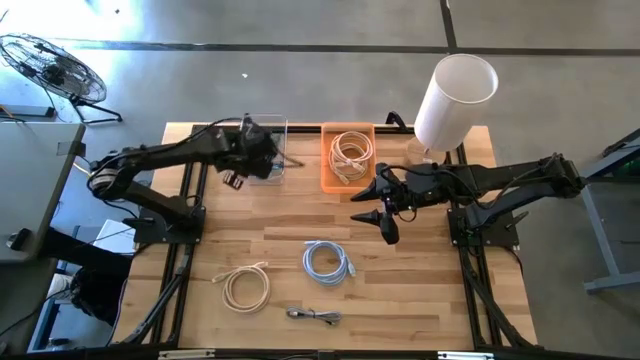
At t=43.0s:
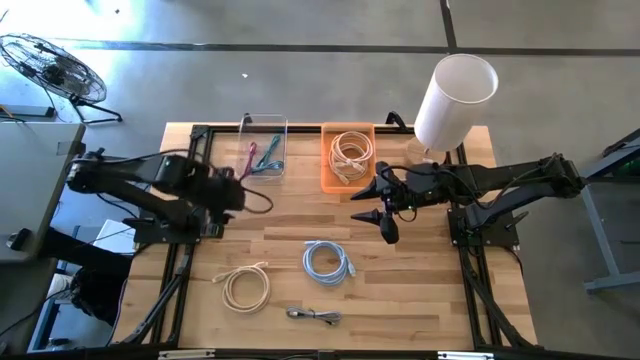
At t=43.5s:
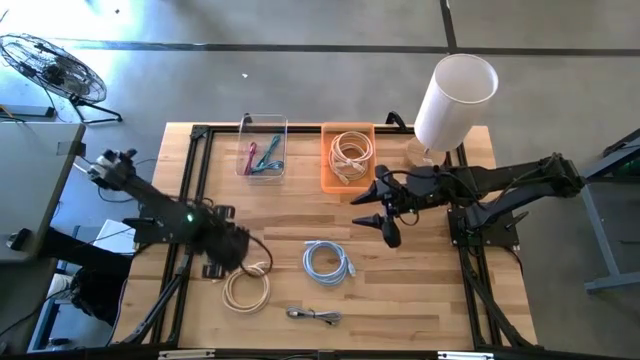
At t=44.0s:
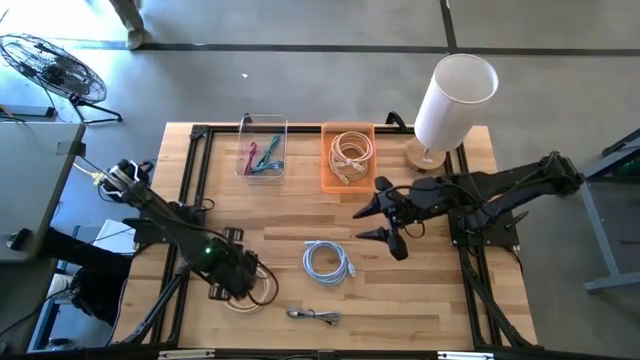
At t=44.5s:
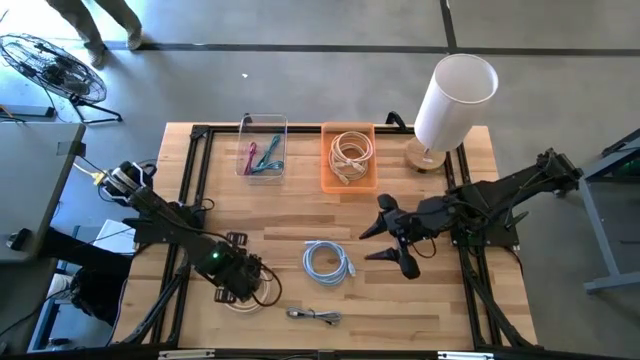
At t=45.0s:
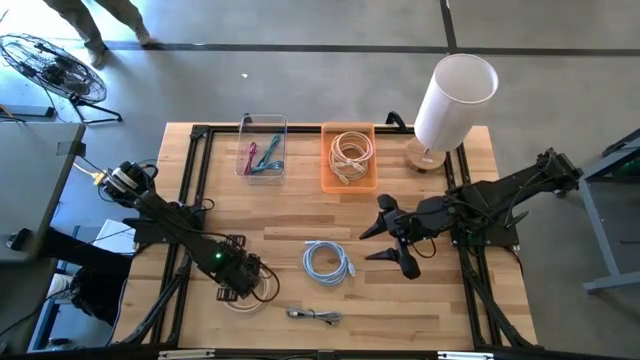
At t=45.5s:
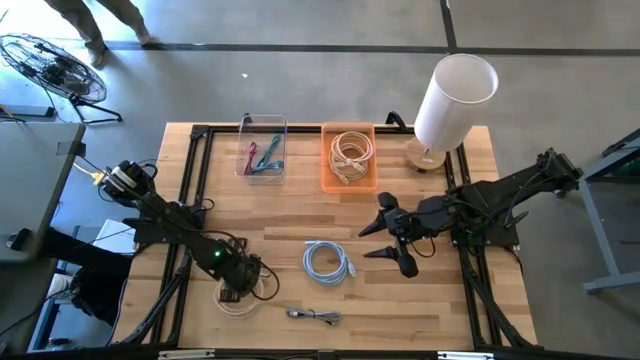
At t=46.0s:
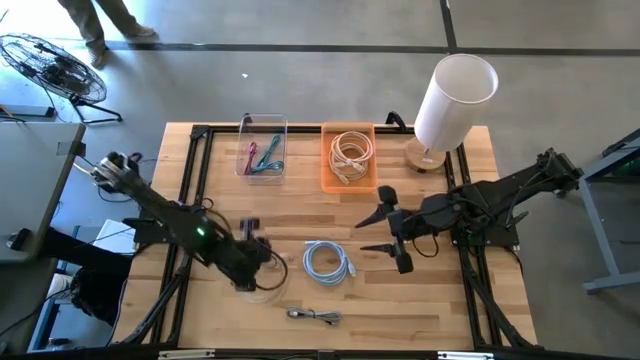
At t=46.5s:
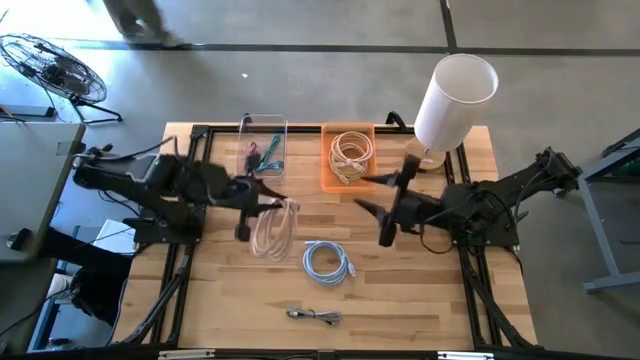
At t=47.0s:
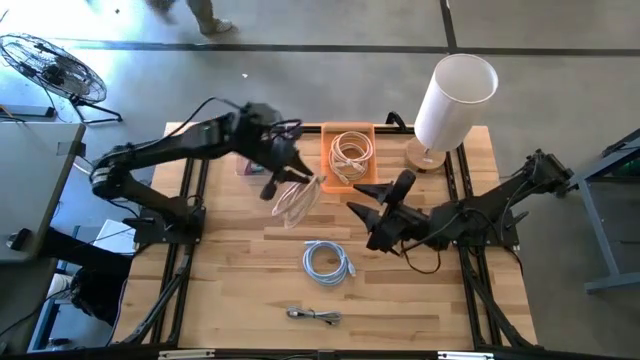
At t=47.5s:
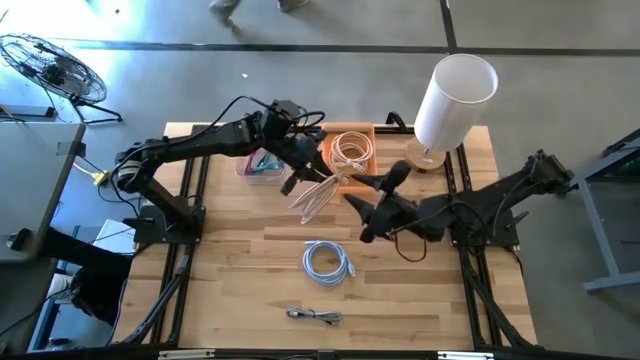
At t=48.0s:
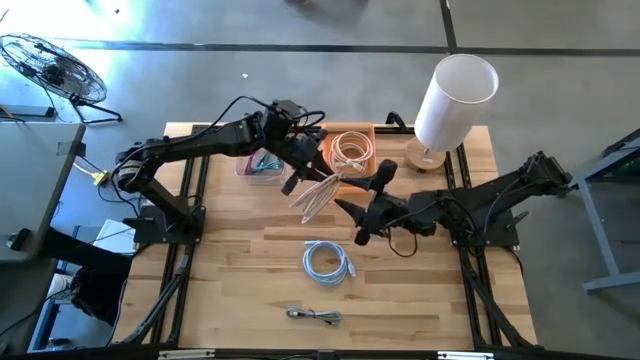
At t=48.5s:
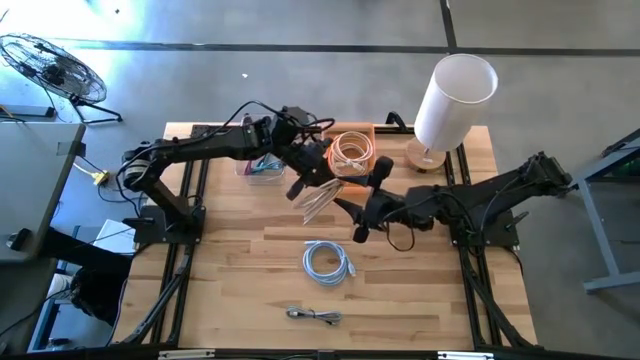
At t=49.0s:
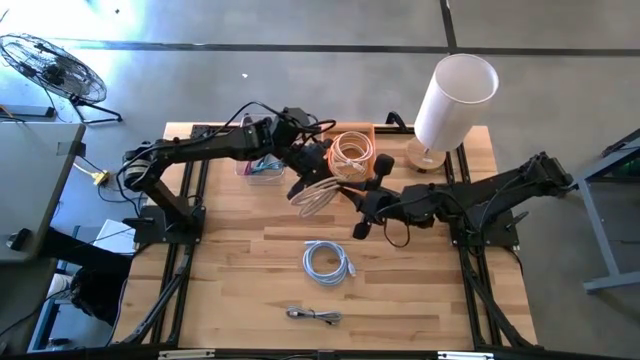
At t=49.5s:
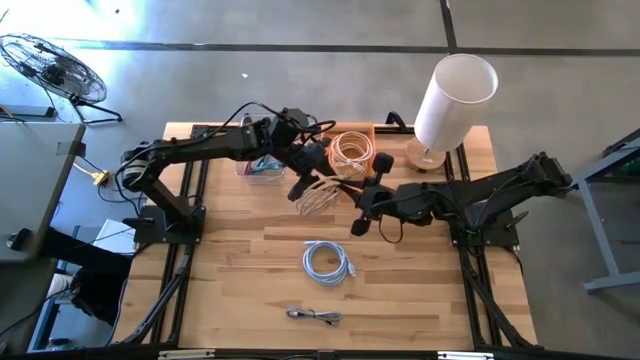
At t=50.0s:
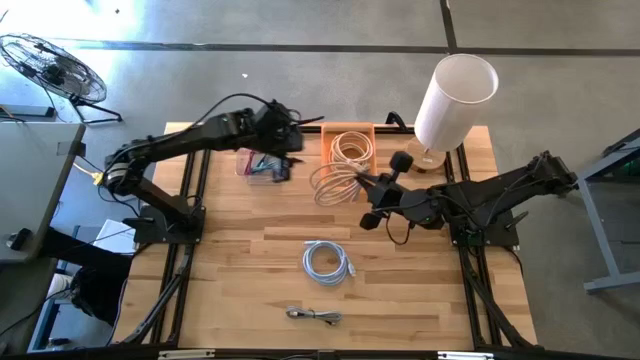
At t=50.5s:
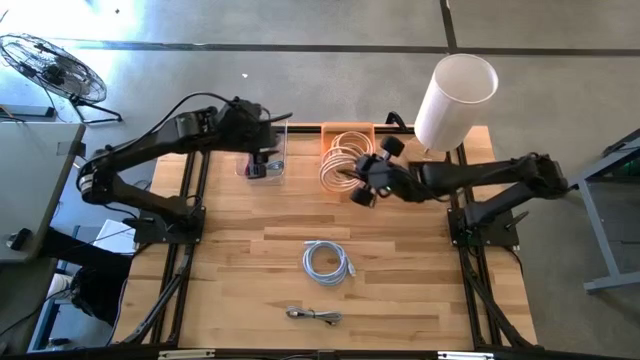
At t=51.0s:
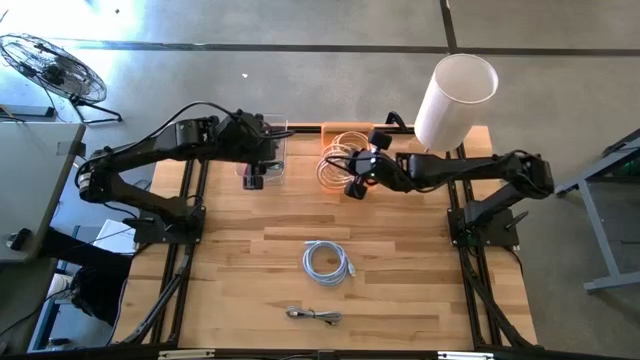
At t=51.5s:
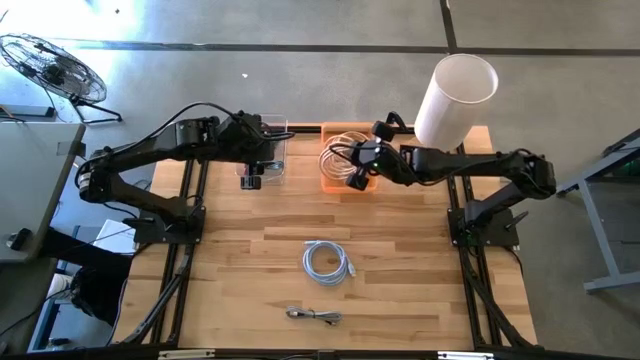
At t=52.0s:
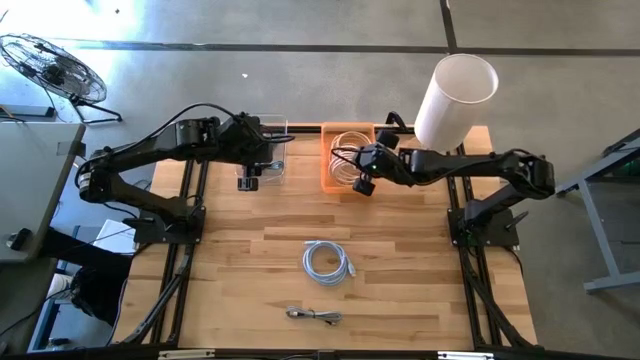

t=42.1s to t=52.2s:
Task: Pick & Place USB Port
Put the white HDMI cable into the orange bin

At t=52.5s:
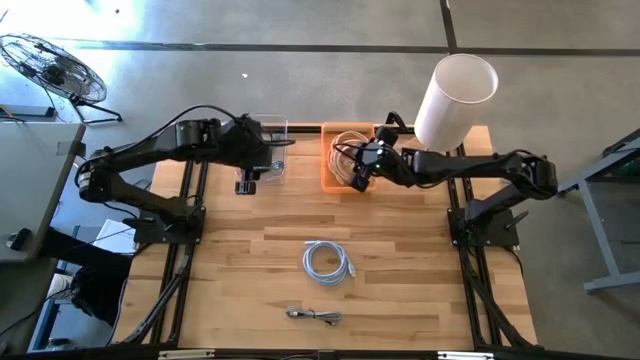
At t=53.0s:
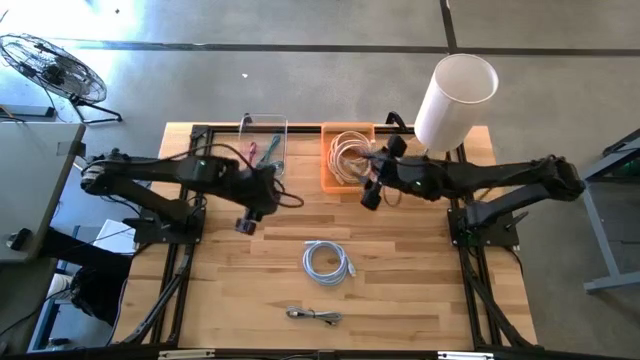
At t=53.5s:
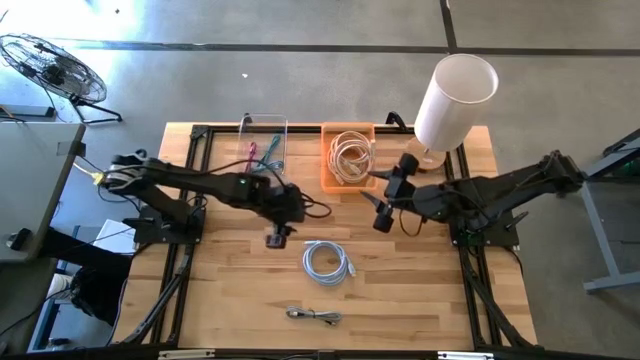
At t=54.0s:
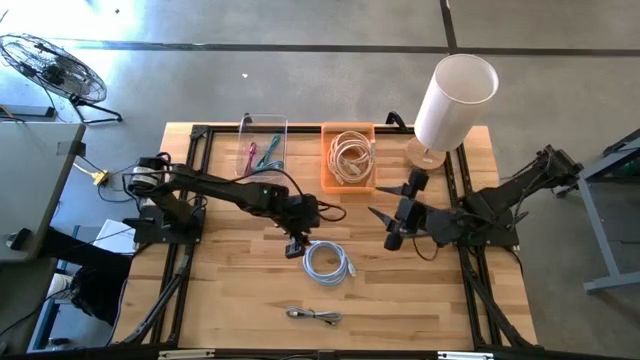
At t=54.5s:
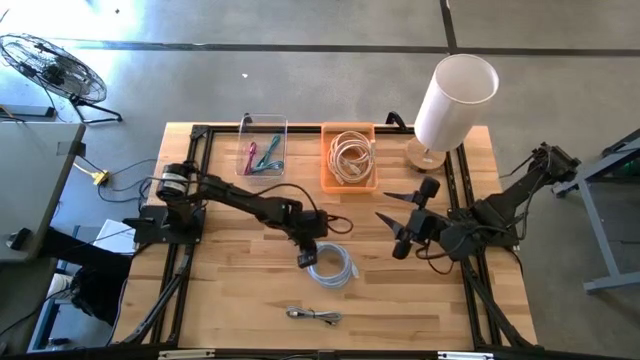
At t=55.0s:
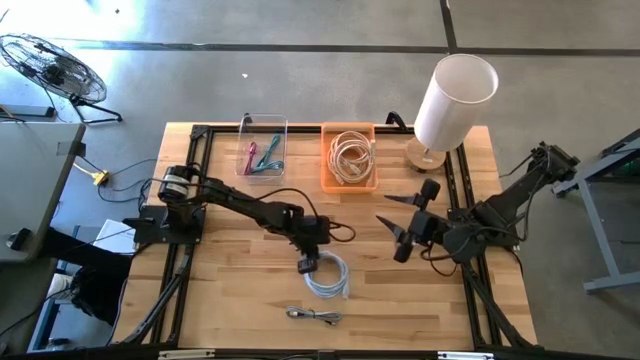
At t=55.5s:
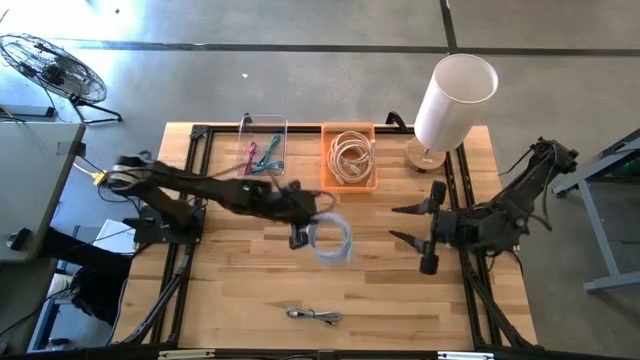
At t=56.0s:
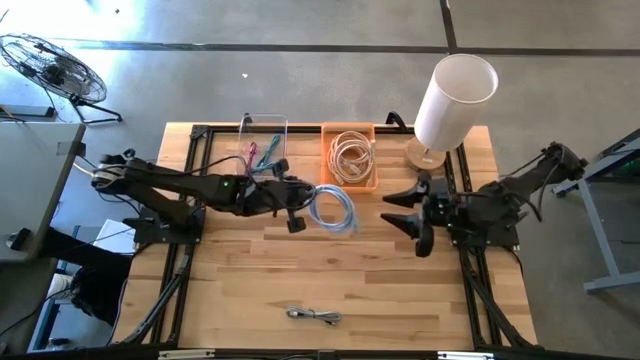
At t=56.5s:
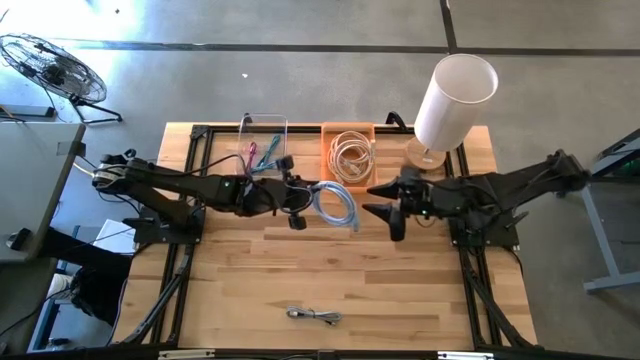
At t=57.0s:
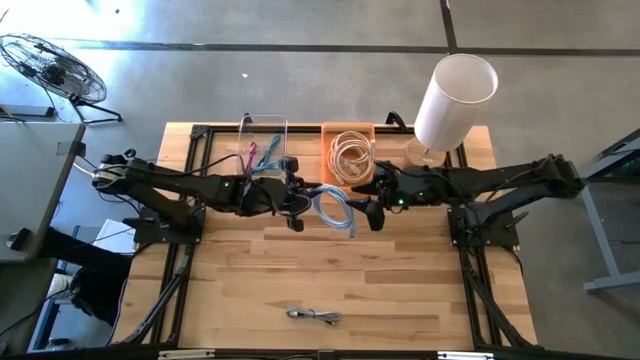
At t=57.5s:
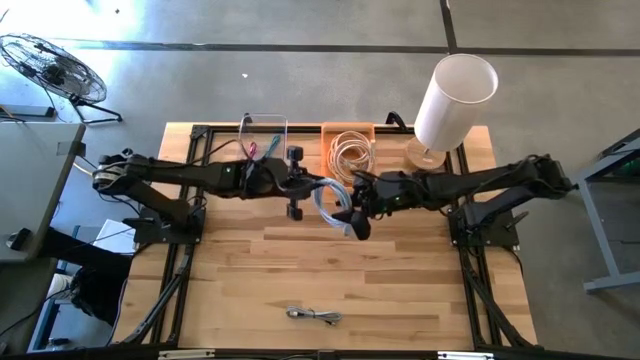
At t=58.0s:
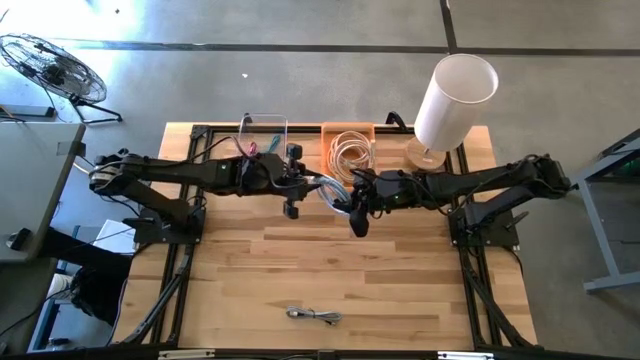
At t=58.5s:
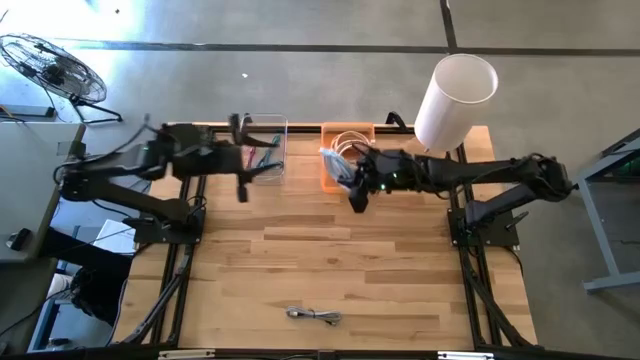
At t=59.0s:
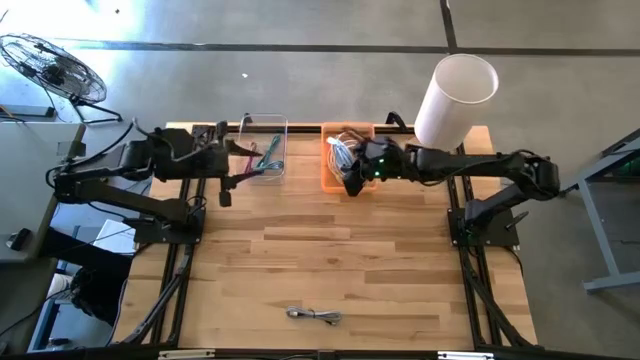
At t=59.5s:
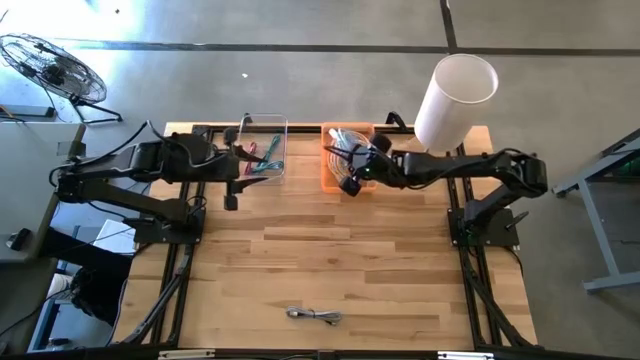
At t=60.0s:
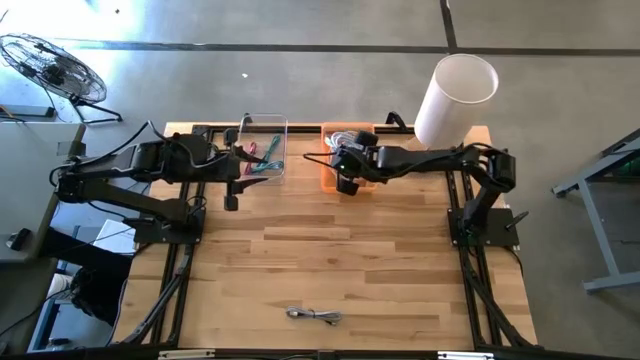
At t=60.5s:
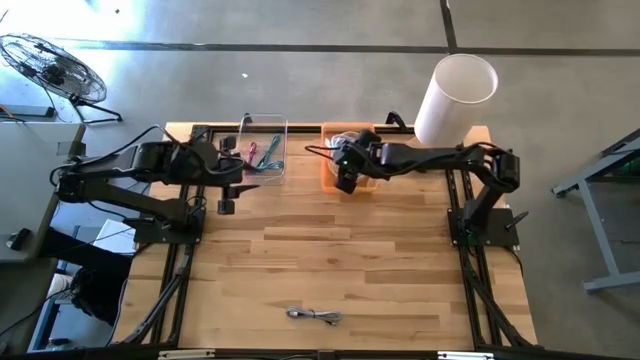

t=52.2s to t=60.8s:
Put the blue HDMI cable into the orange bin

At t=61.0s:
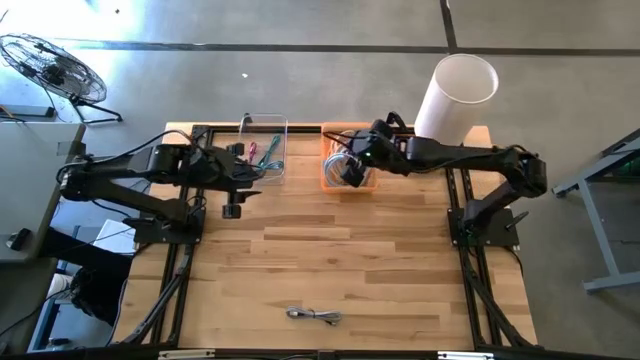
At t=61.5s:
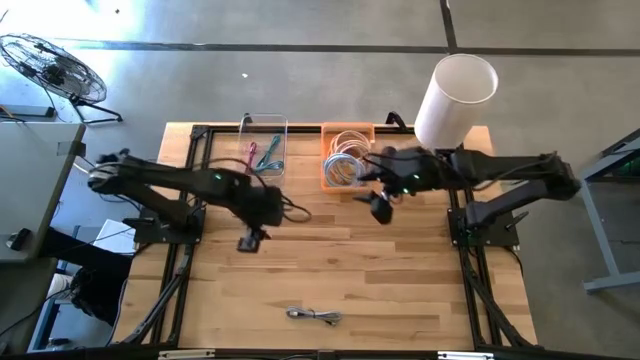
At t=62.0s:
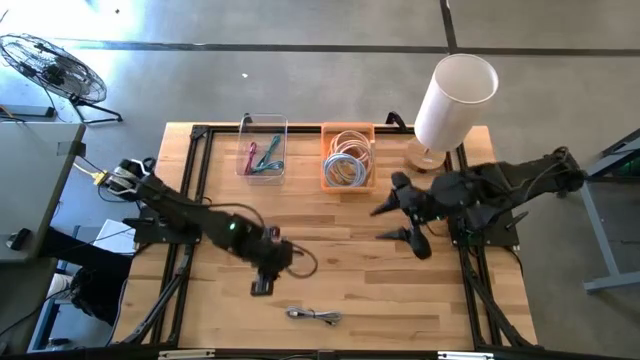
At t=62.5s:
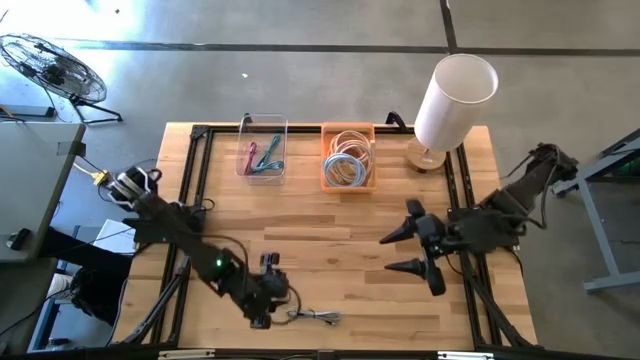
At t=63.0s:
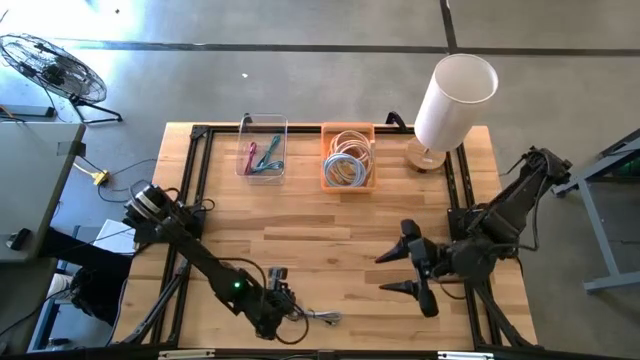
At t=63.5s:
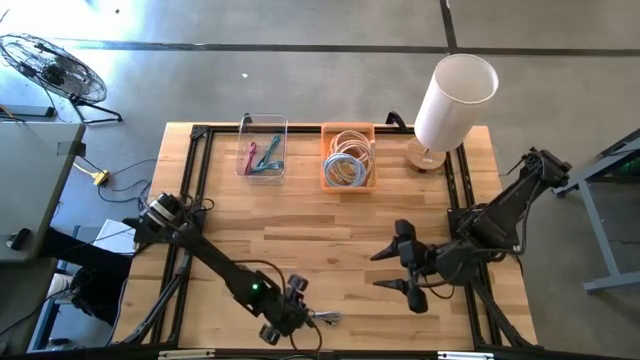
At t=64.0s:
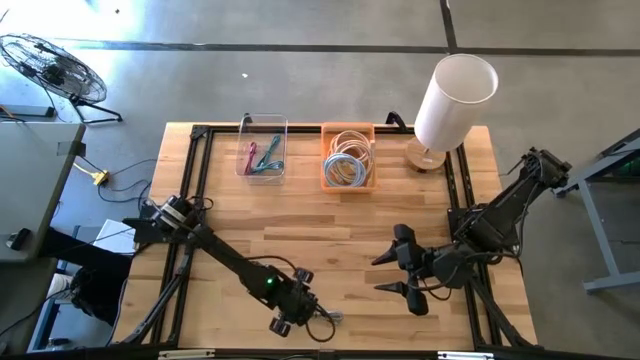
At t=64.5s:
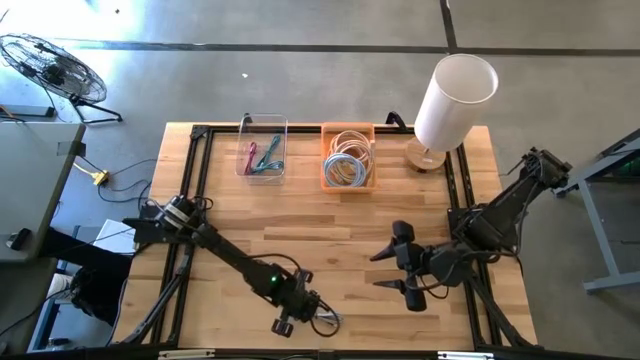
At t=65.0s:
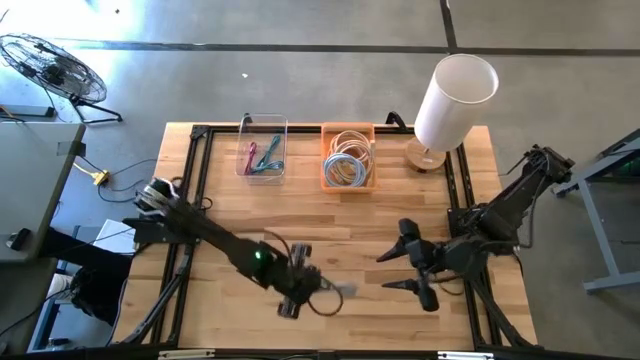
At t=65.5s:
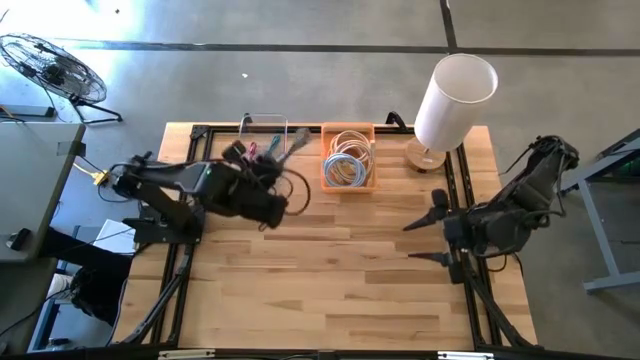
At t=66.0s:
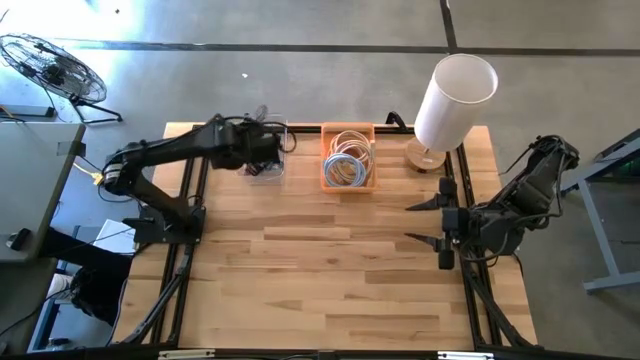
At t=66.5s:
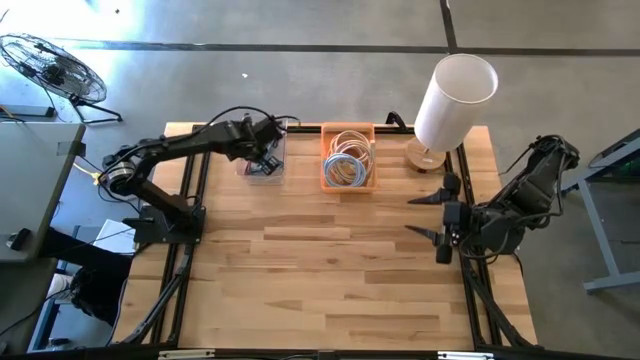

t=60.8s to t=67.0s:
Put the black and white charger cable into the transparent bin
